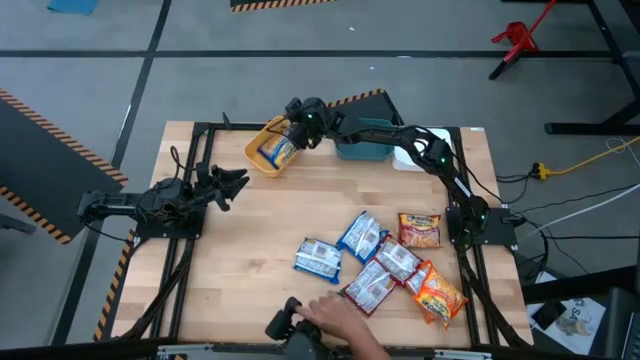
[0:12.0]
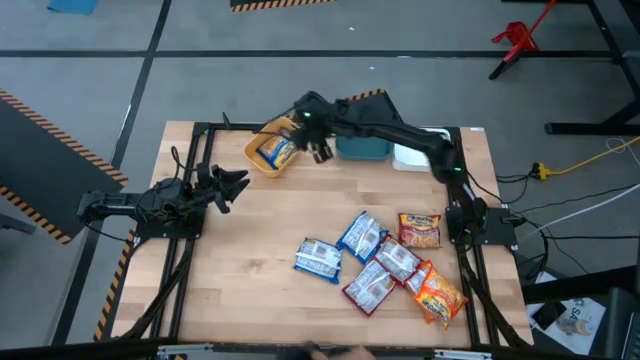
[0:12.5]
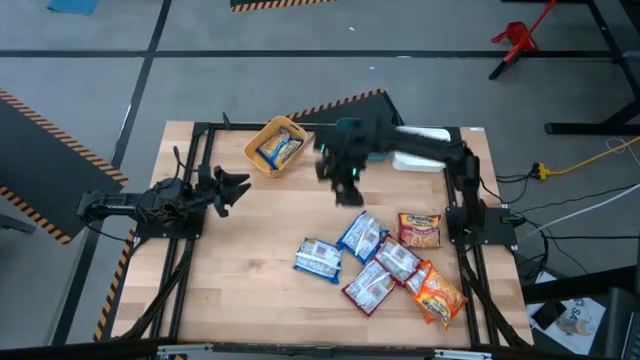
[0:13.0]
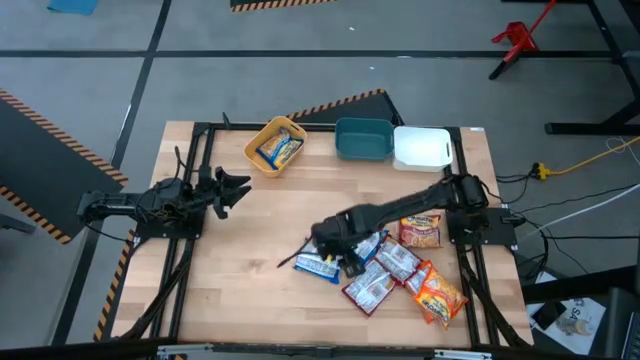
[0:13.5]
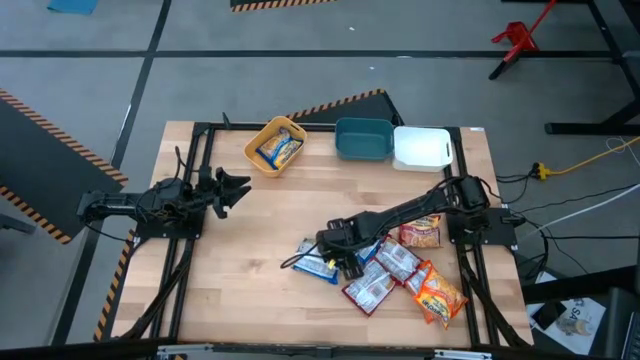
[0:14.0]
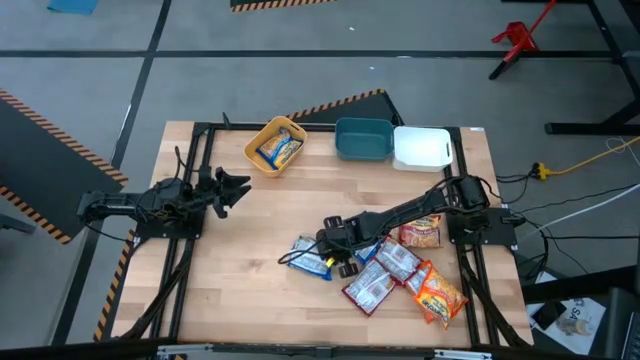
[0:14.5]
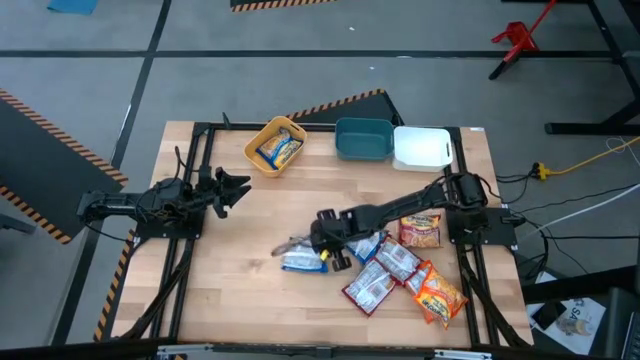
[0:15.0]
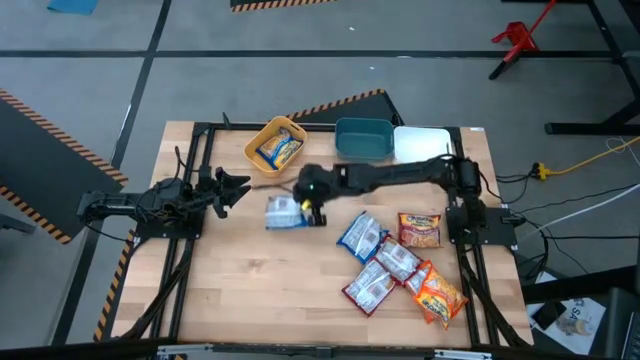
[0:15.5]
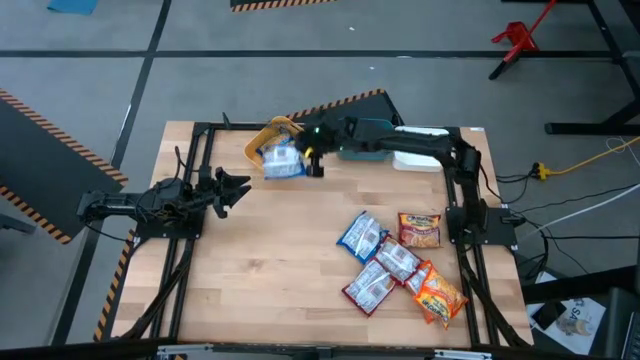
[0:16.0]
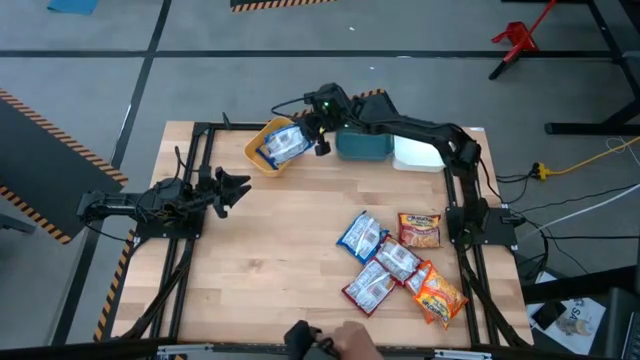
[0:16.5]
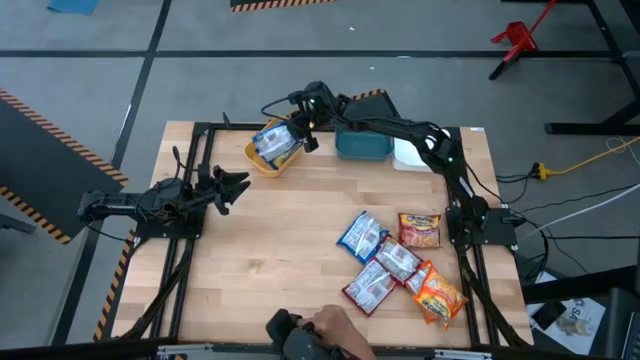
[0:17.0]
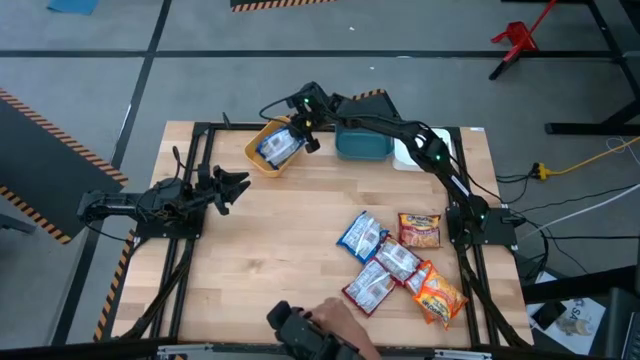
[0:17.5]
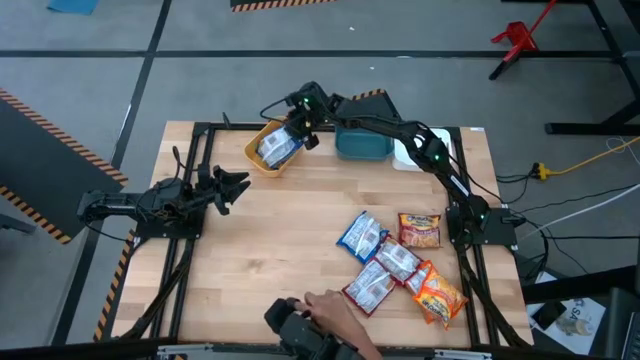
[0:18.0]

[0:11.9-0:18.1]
Task: Sort Maruchan noodles
Put the left blue noodle pack into the yellow bin

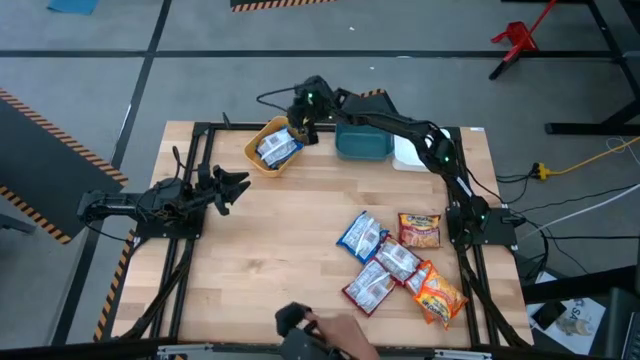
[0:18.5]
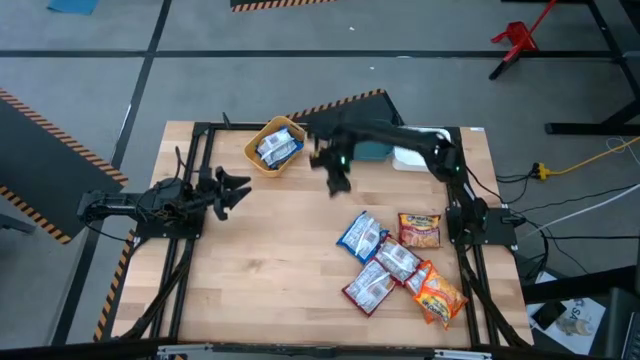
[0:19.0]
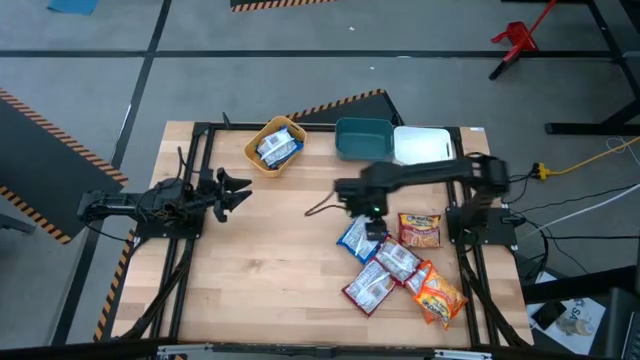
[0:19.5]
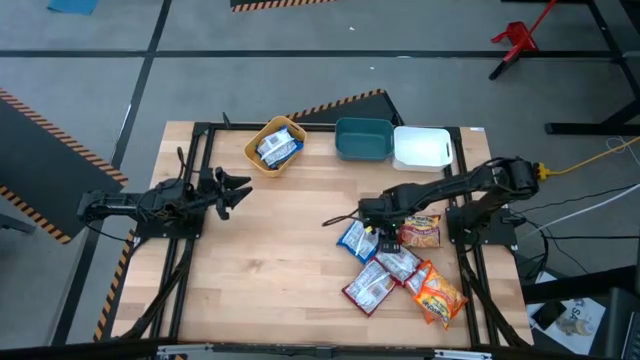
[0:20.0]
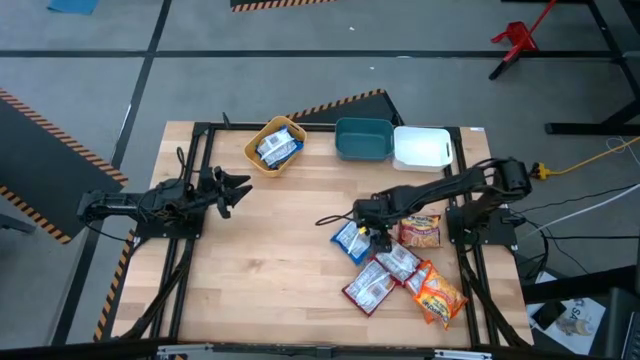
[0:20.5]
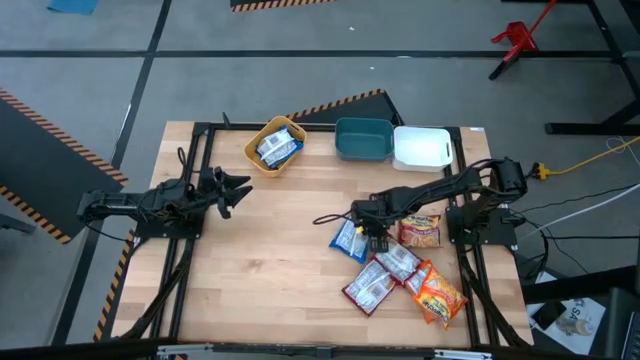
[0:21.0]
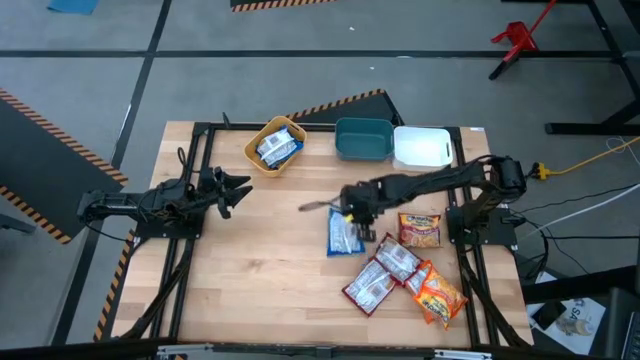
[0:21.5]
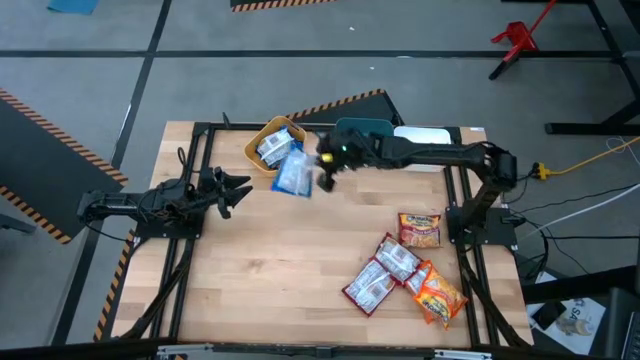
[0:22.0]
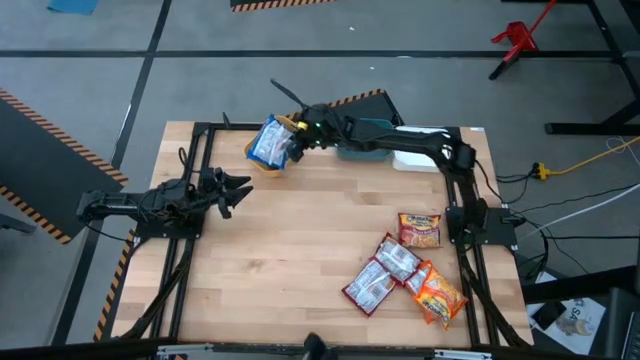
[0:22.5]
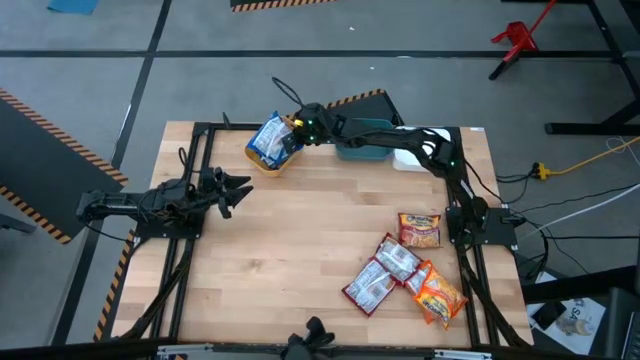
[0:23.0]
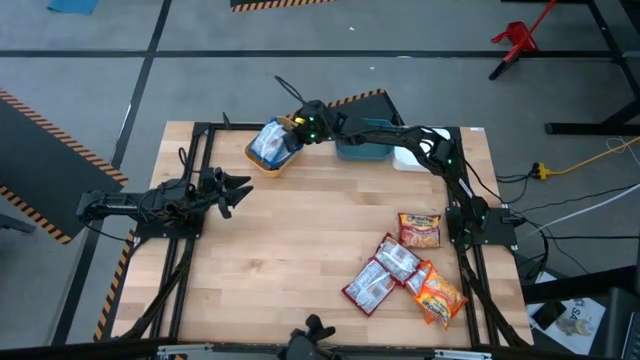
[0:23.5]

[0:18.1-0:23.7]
Put the blue noodle pack into the yellow bin

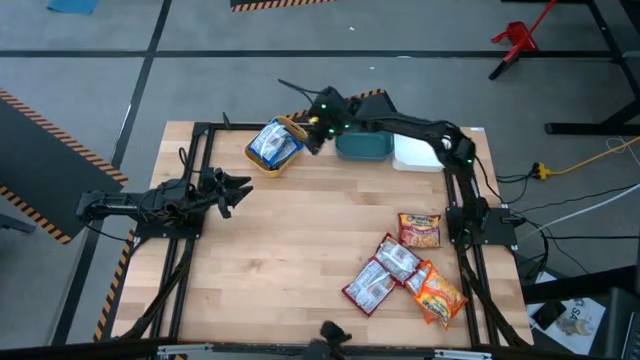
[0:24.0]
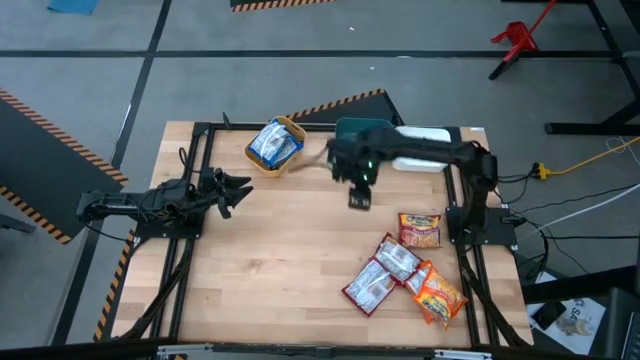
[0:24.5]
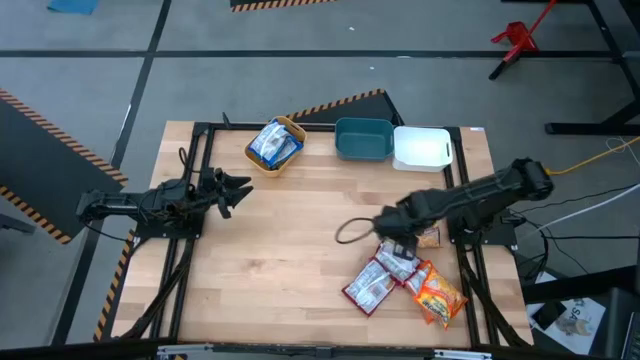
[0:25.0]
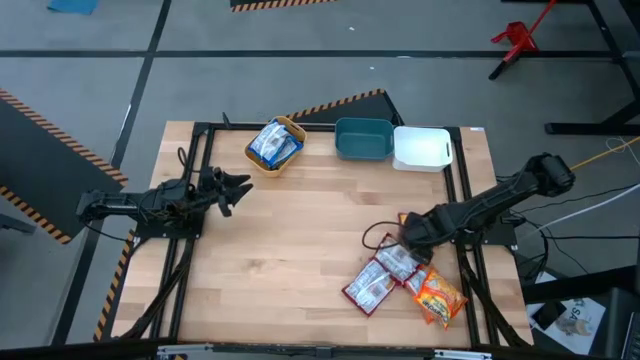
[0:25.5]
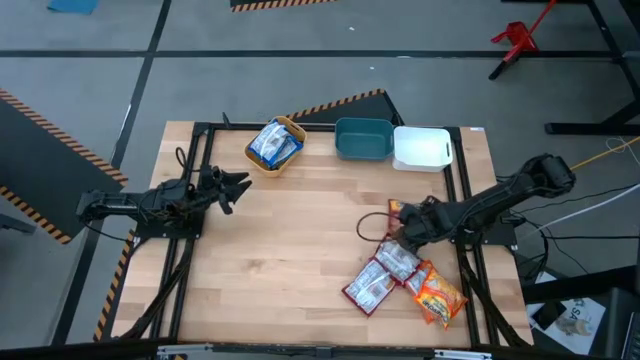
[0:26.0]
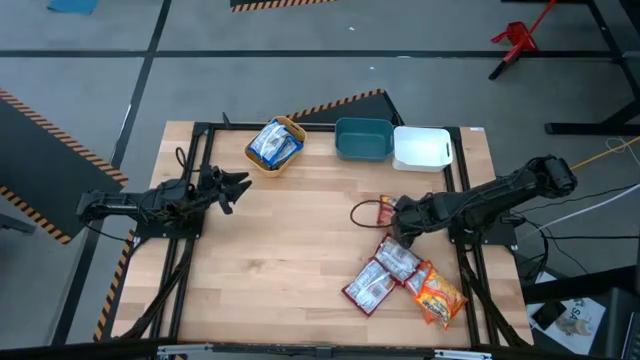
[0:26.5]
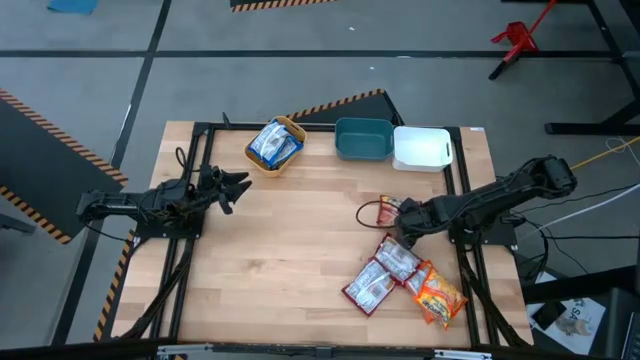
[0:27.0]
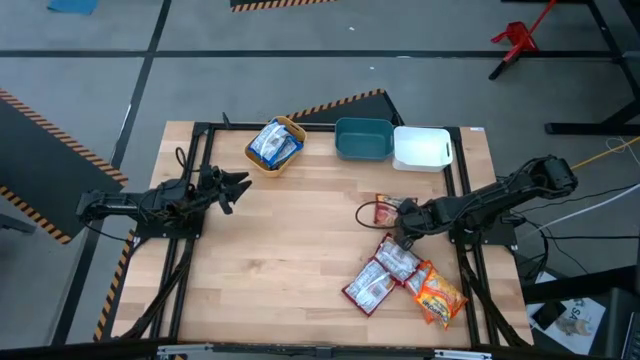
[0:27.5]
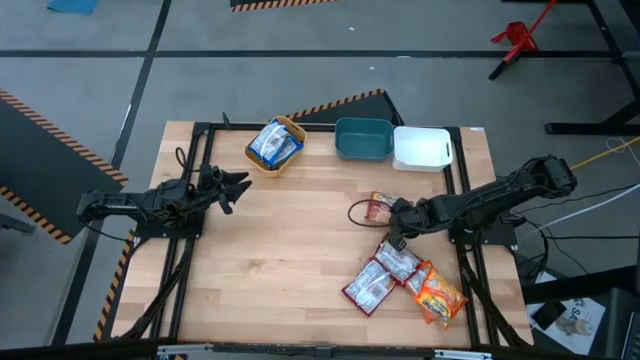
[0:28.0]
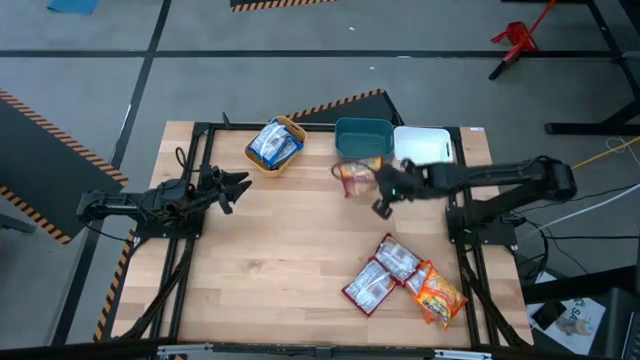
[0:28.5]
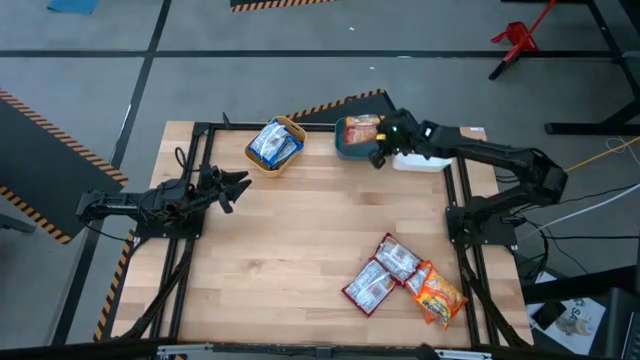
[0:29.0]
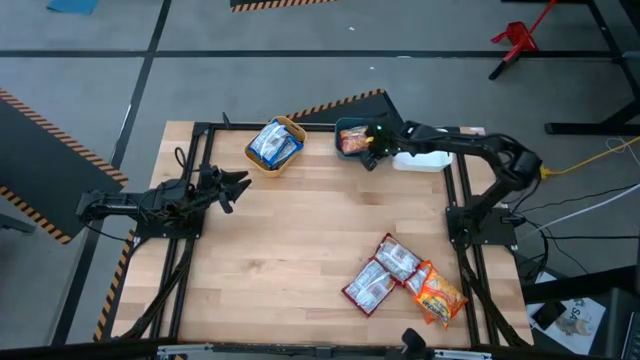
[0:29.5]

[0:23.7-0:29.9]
Put the top right red noodle pack into the blue bin

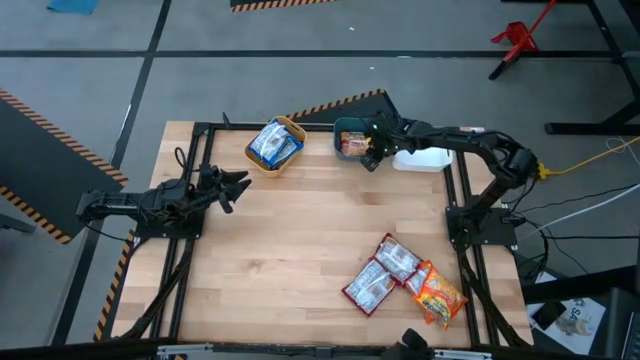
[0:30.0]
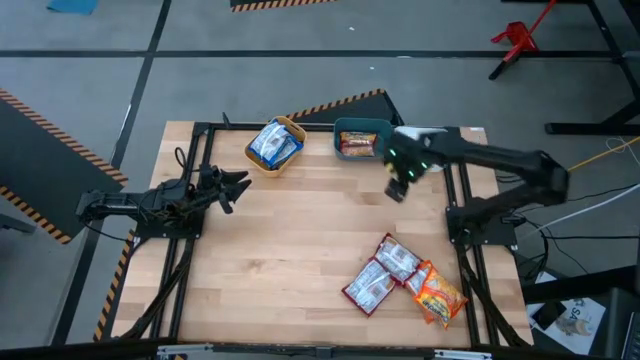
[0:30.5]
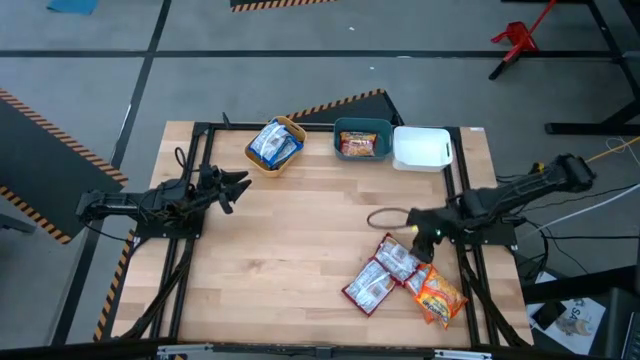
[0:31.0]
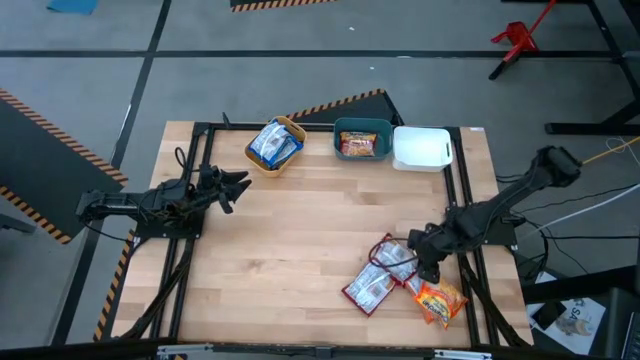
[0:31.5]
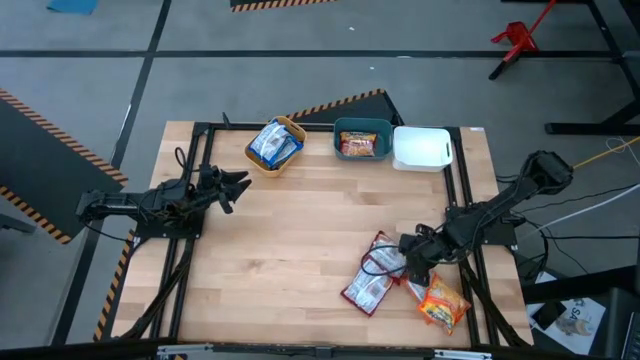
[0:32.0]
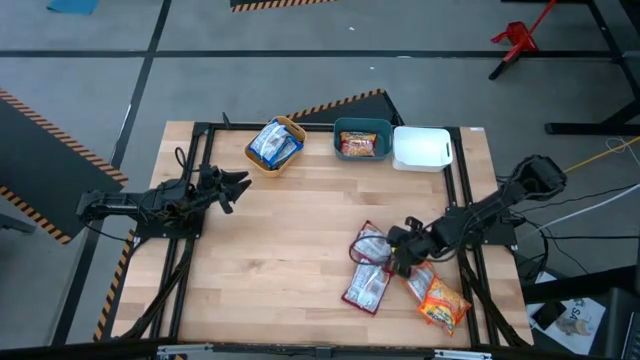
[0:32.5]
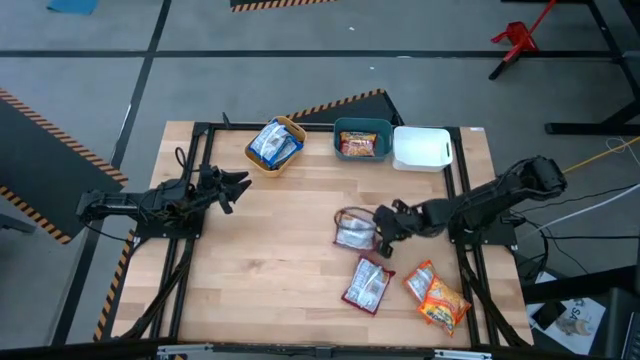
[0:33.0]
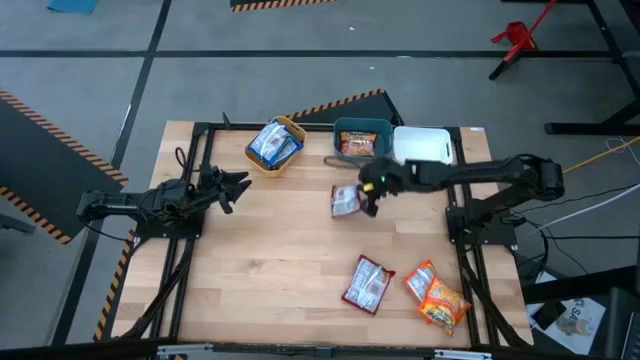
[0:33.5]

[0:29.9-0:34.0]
Put the top red noodle pack into the blue bin
